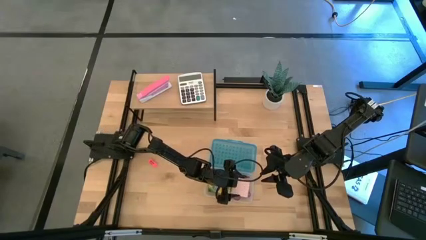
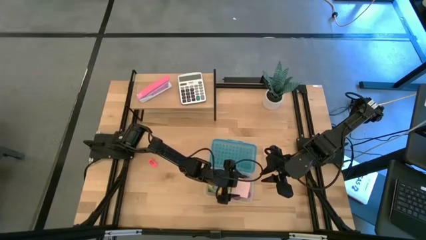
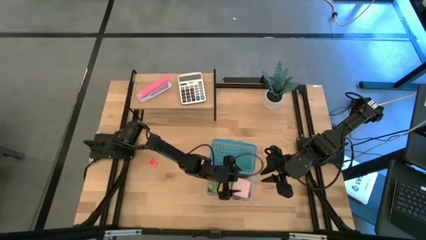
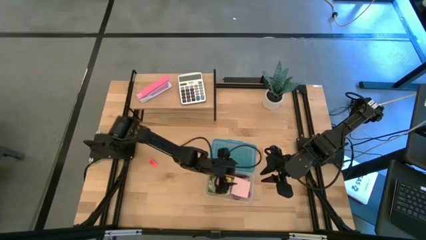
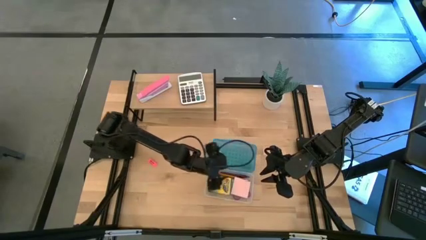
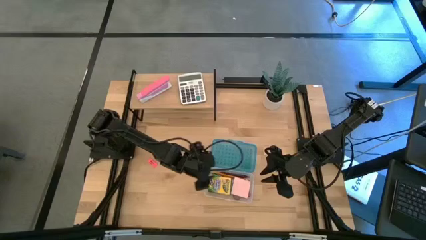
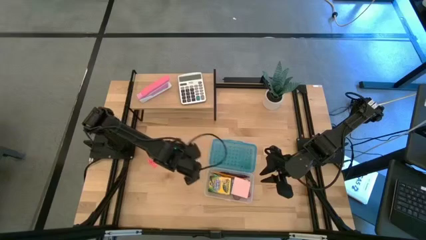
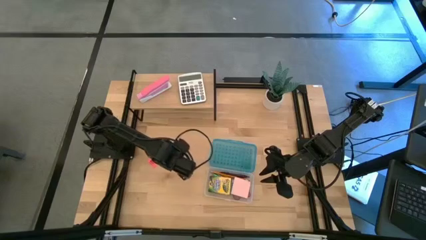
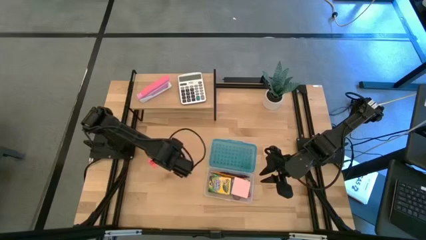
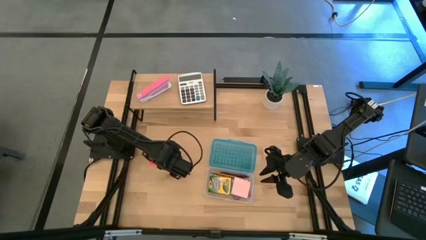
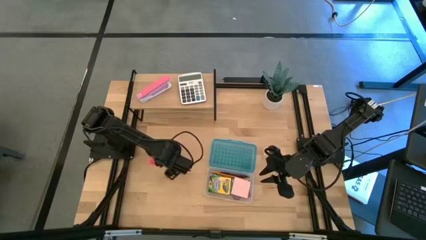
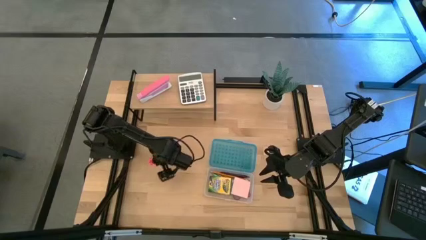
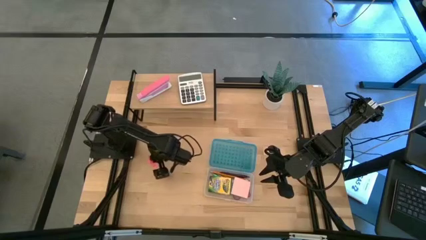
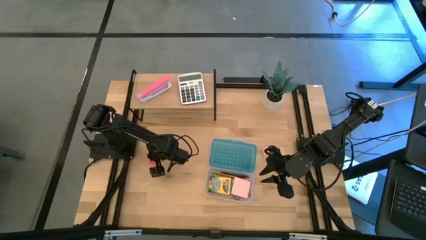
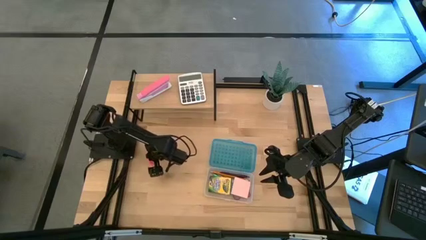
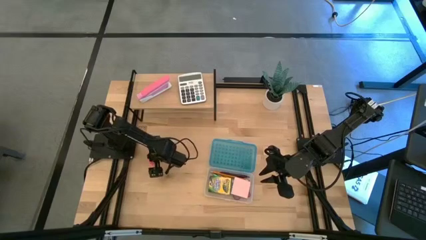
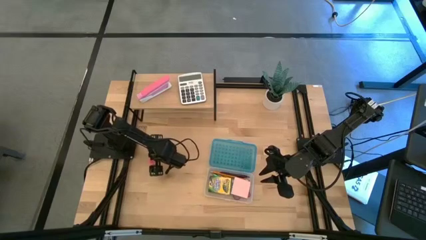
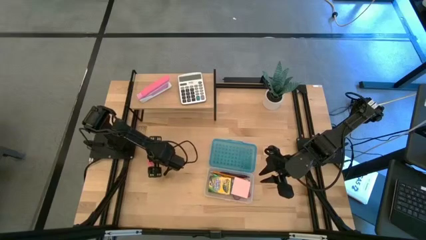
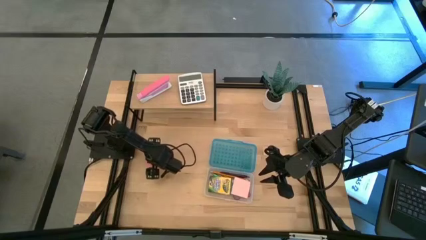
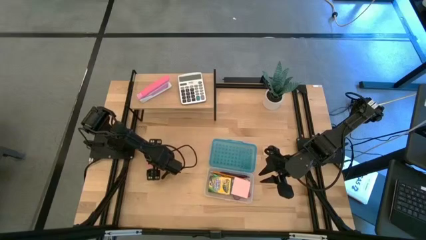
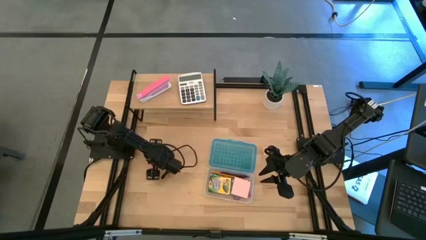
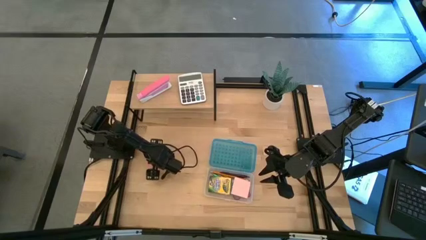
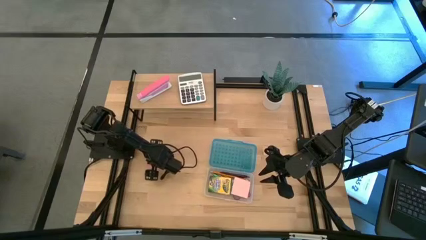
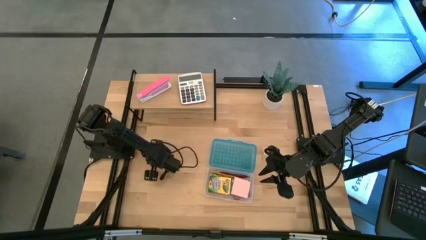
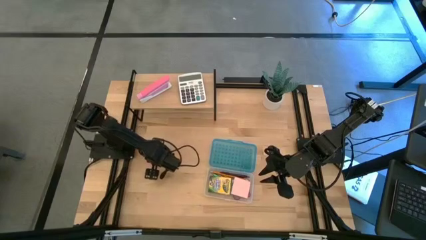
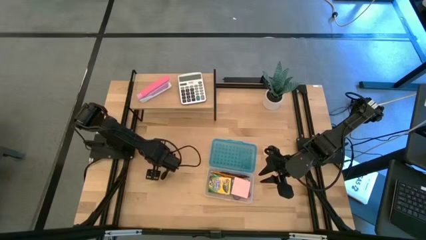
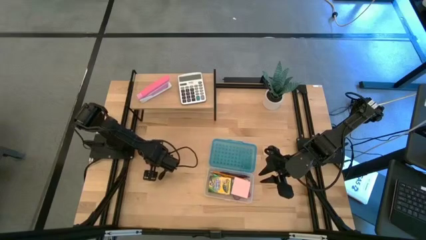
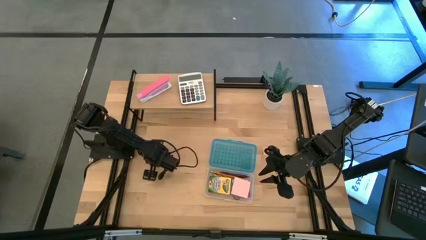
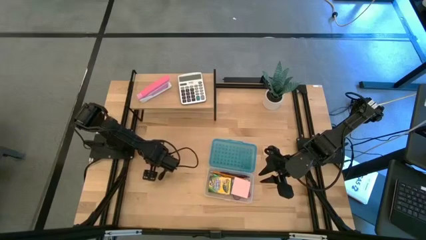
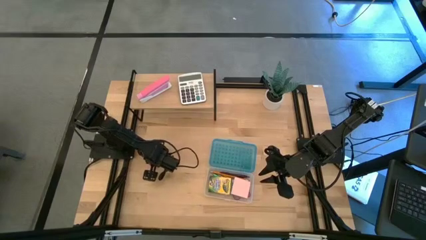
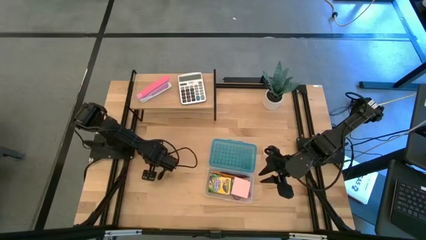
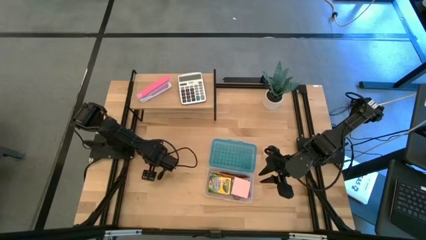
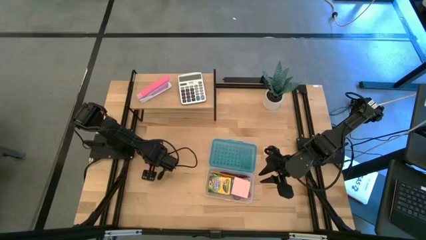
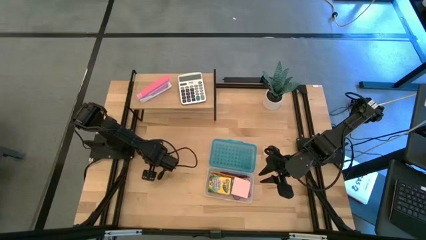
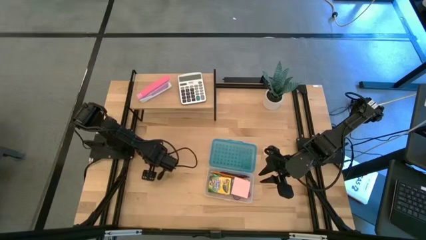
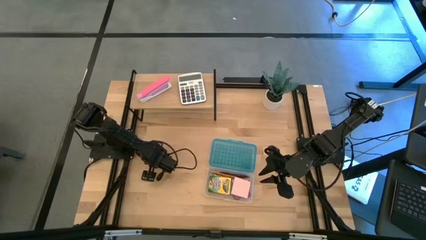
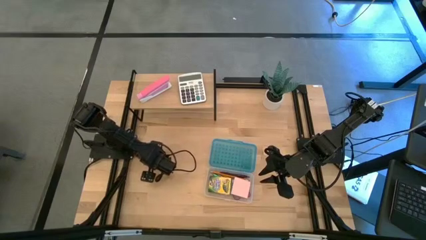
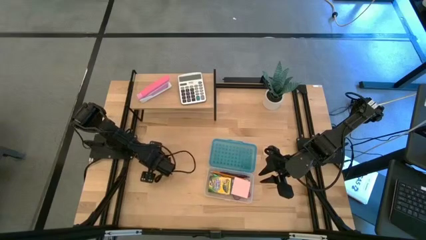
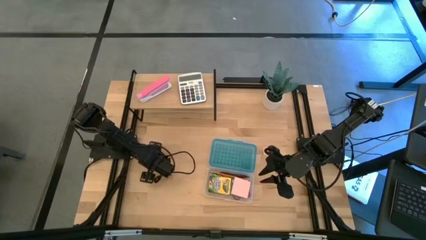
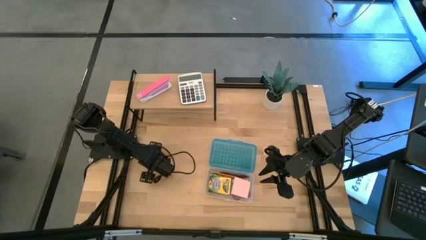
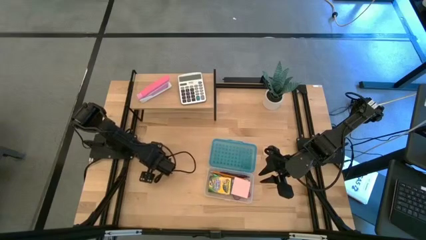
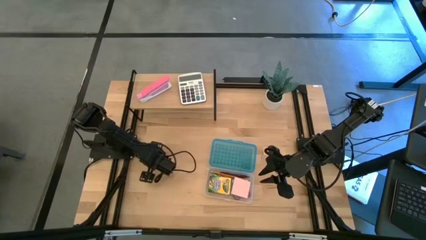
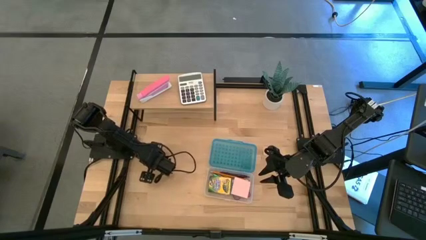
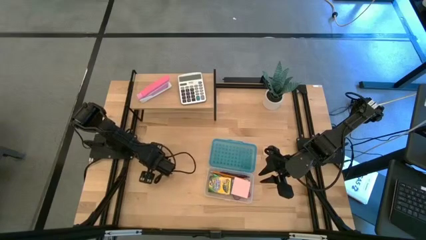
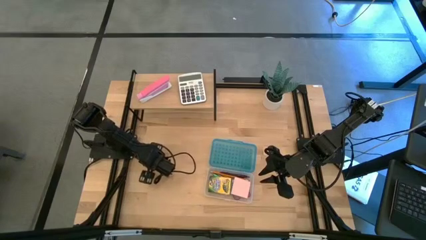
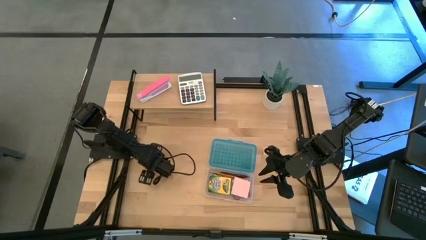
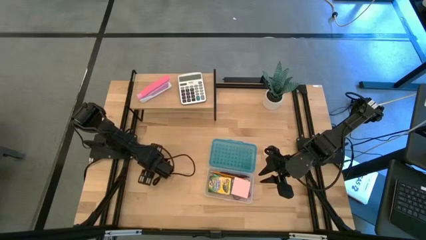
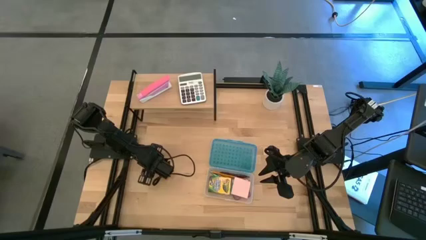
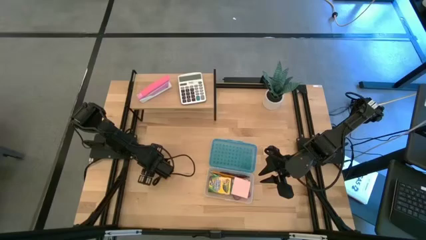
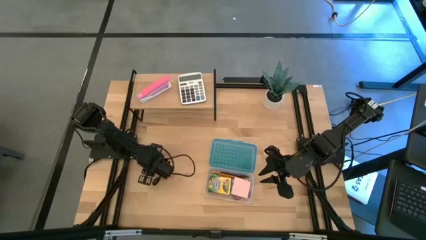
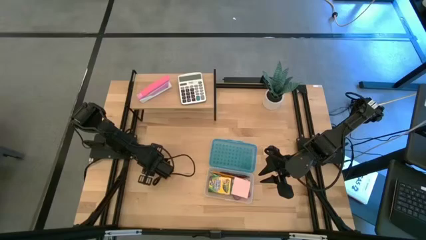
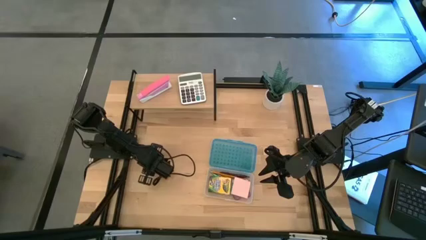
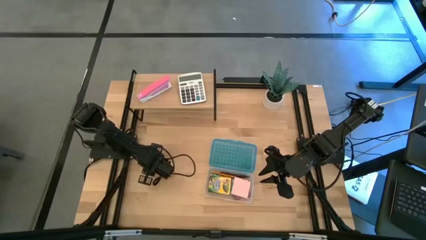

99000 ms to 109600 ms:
Task: Pack school essentials
Put the pink eraser into the blue supply box

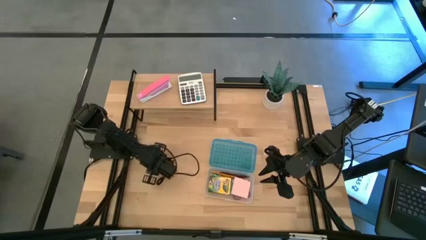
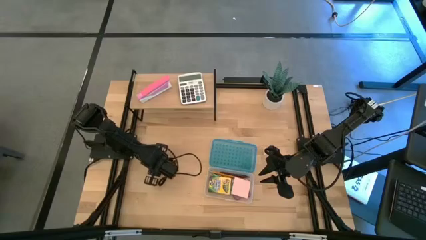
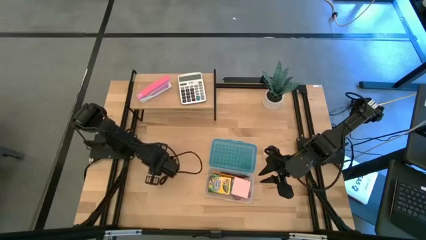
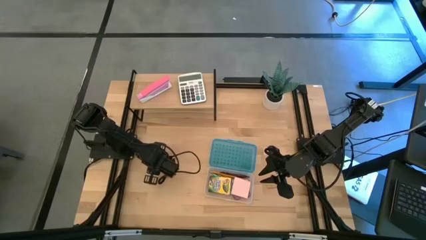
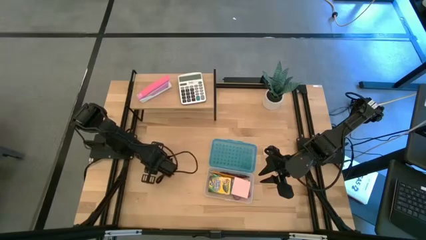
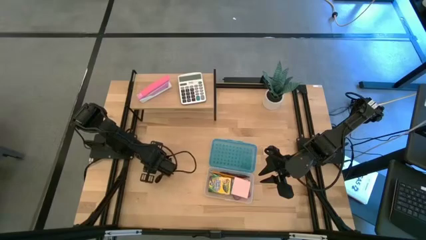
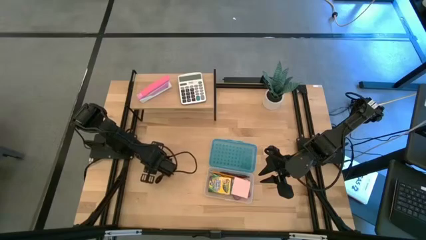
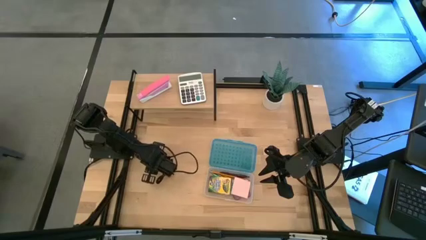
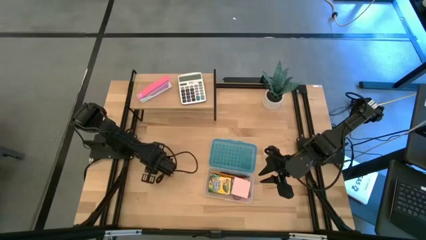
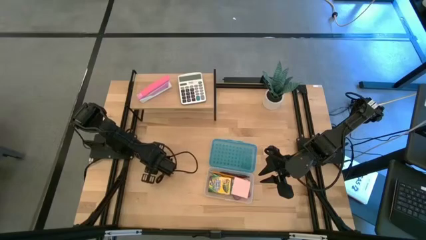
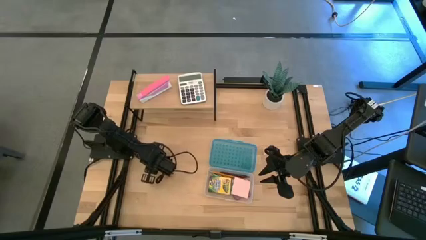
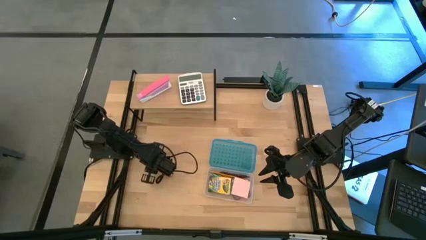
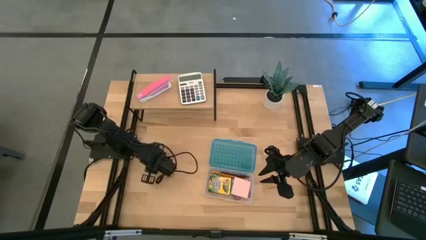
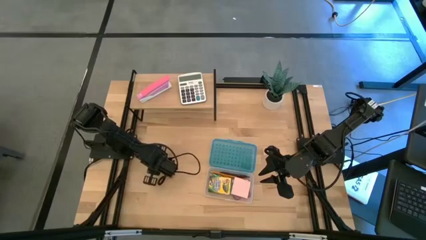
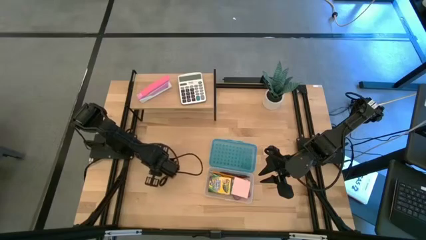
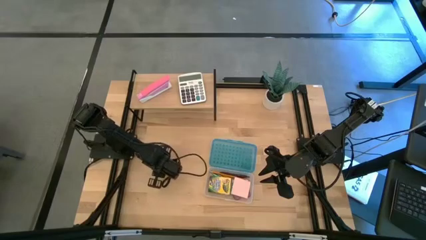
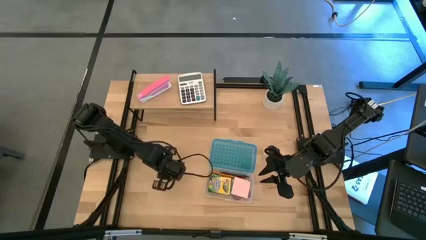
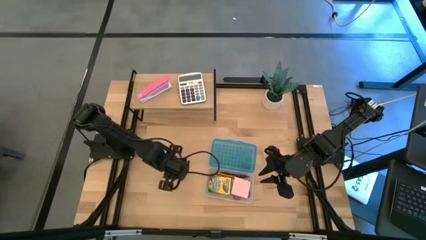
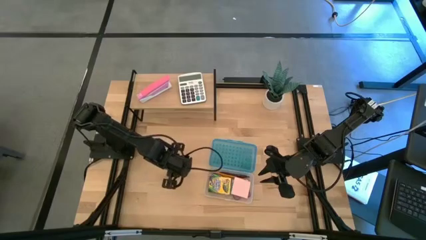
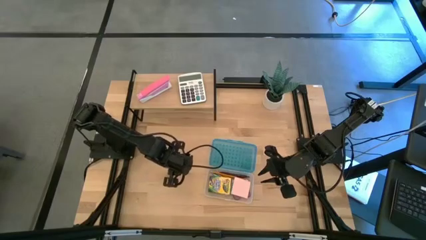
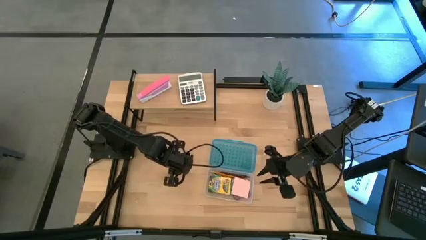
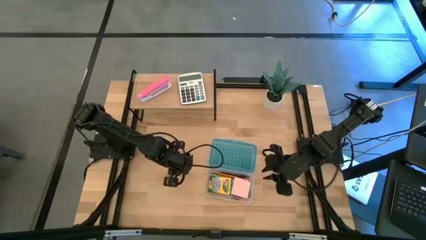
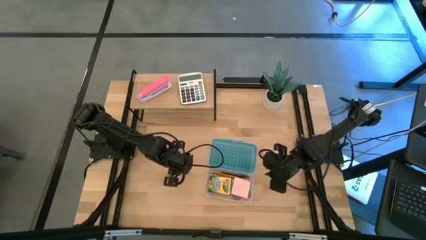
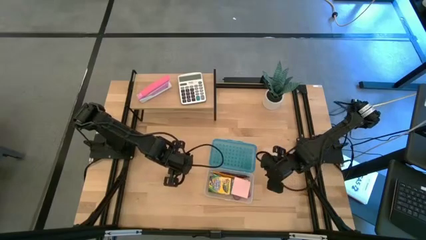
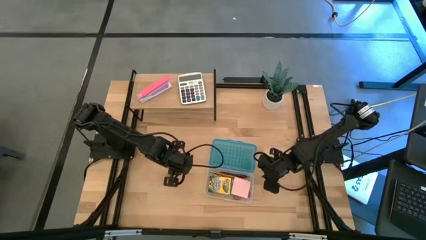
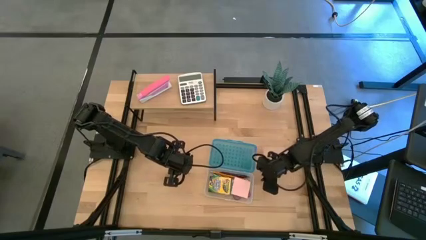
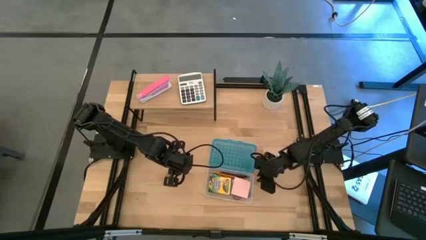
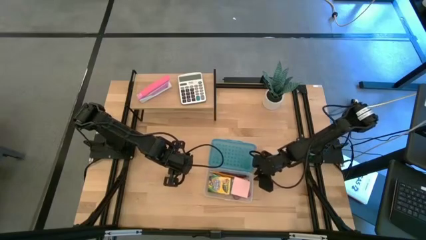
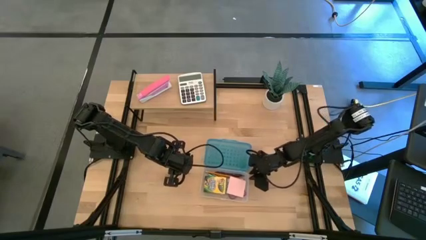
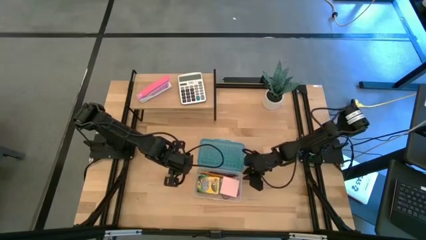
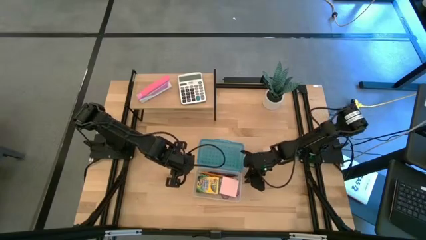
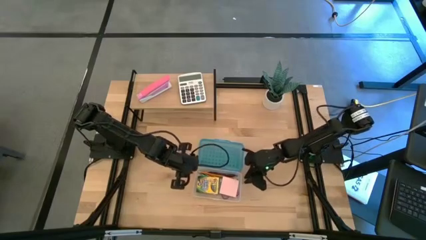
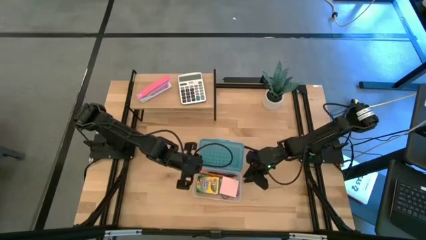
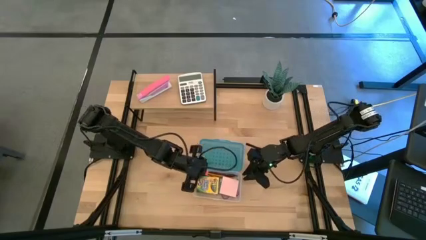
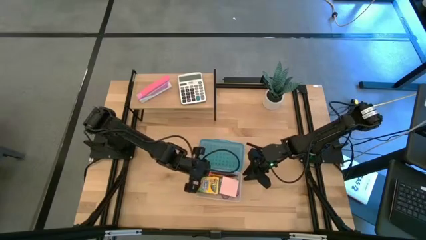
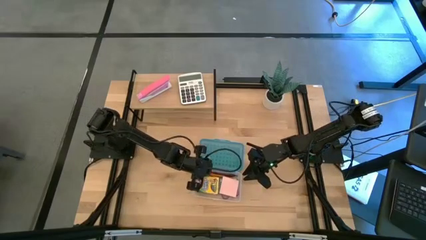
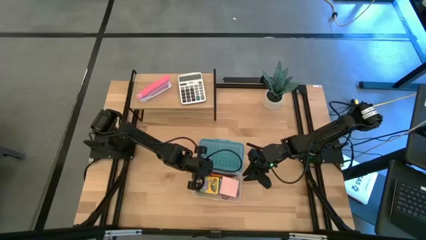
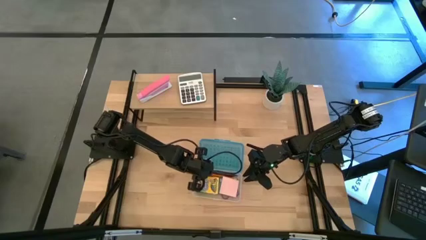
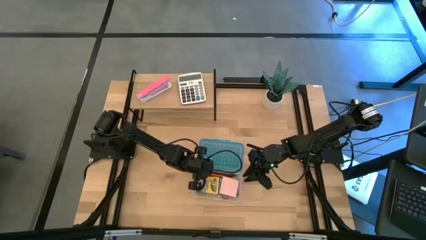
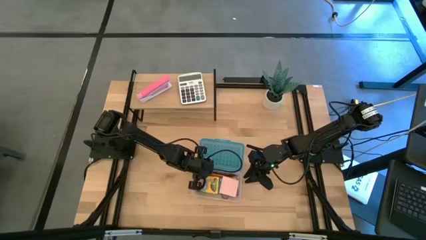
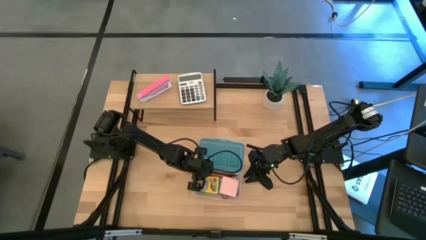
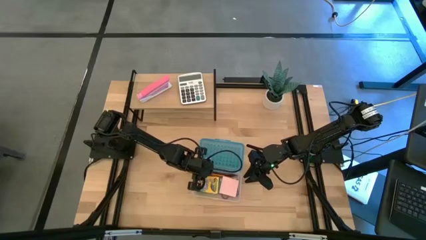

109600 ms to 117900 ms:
Put the pink eraser into the blue supply box
